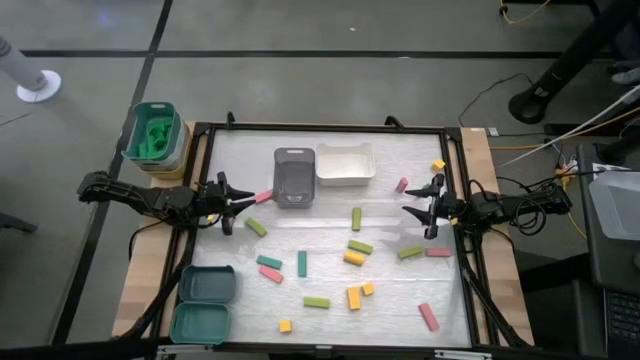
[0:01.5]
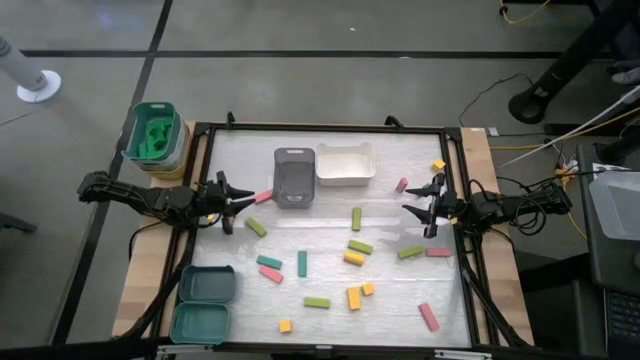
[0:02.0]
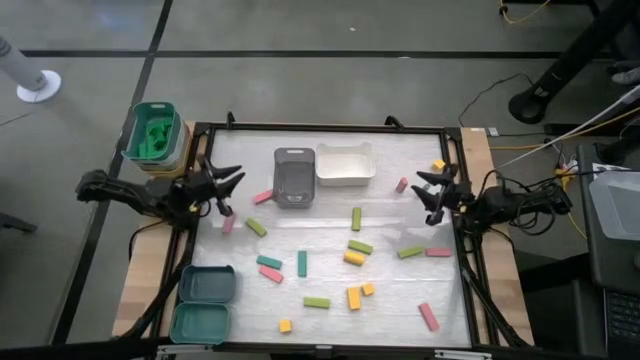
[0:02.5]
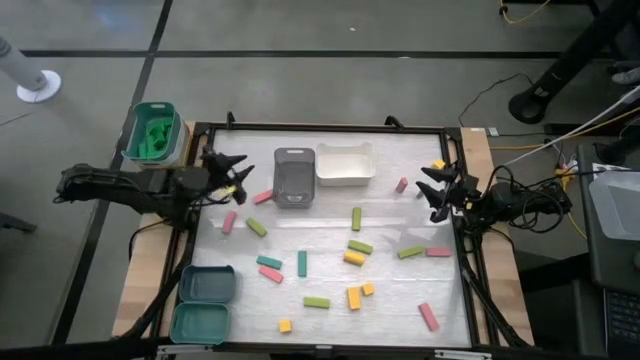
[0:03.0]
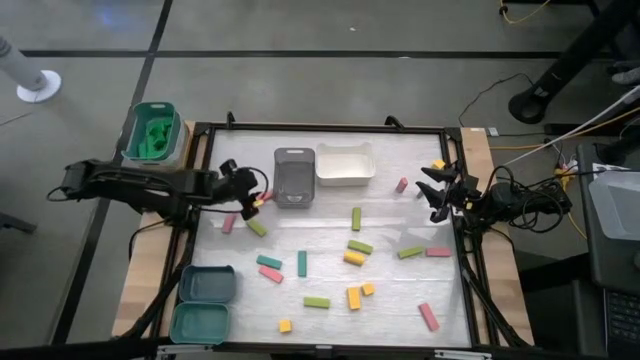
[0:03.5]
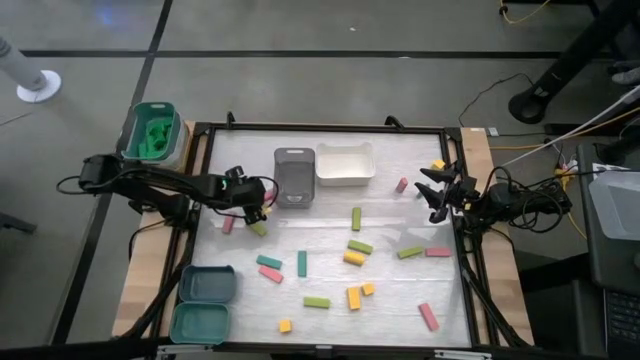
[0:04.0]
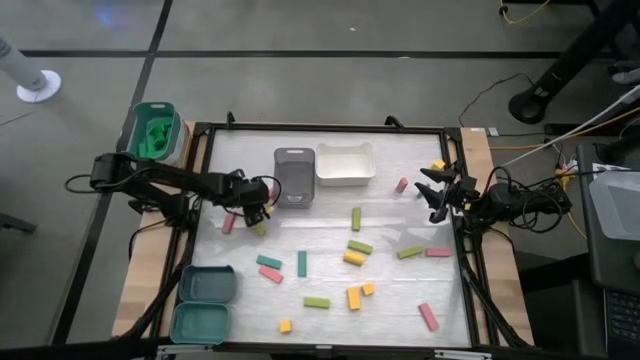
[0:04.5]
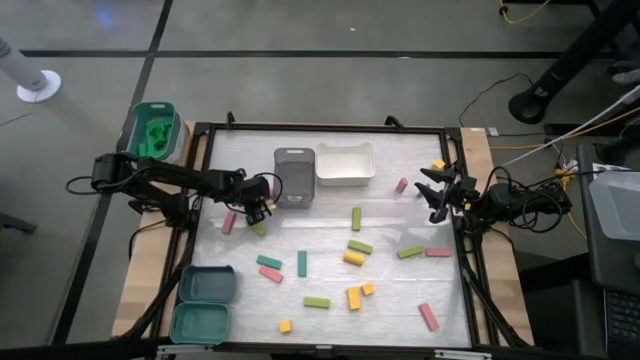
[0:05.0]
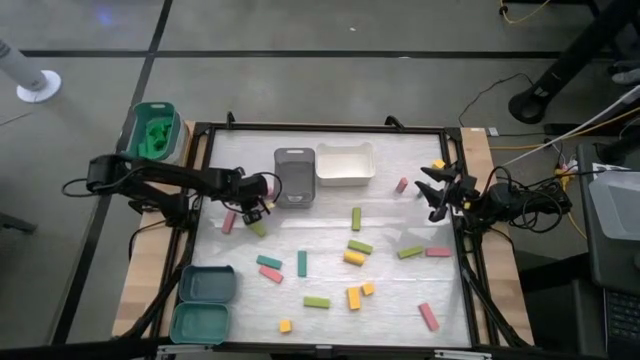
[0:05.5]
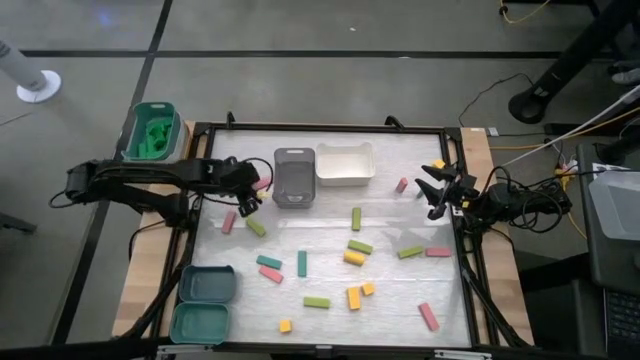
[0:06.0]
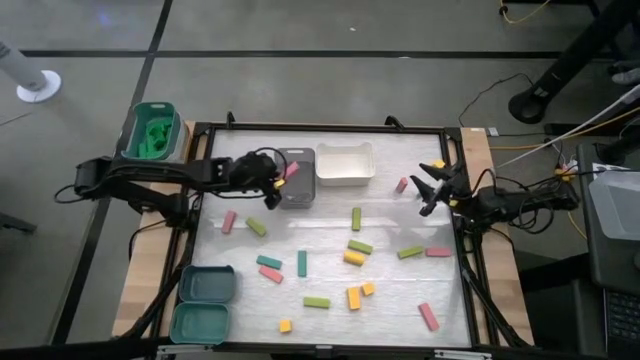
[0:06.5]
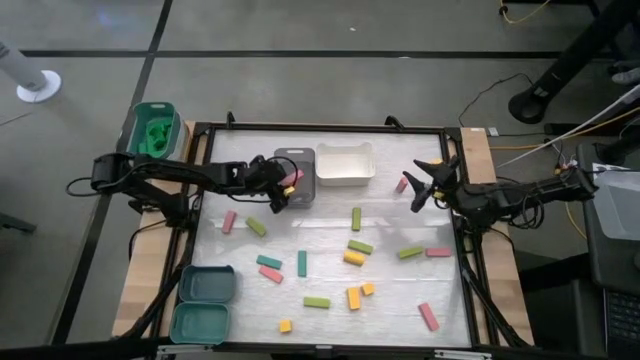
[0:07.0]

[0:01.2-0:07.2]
Task: Sort blocks
Put the pink block into the black bin

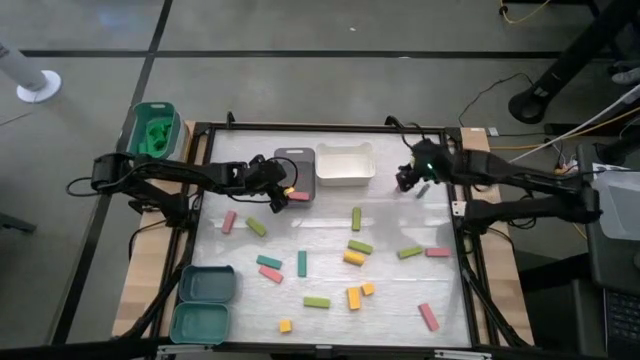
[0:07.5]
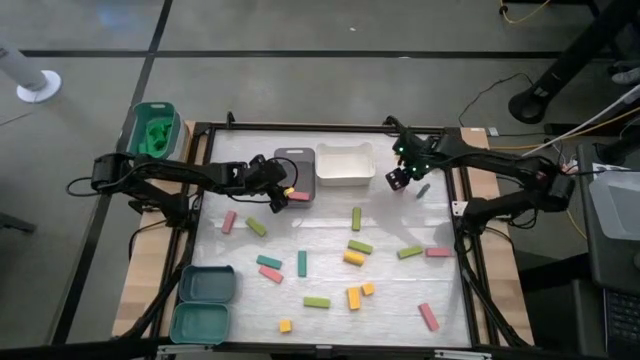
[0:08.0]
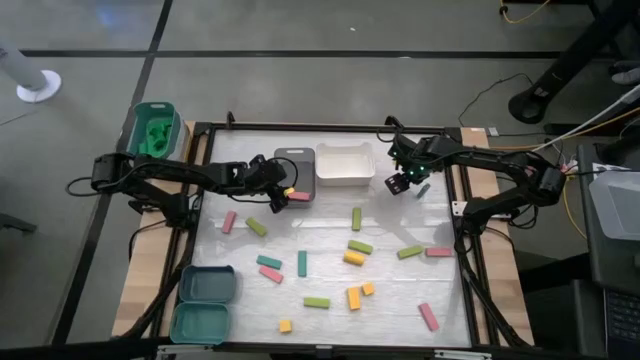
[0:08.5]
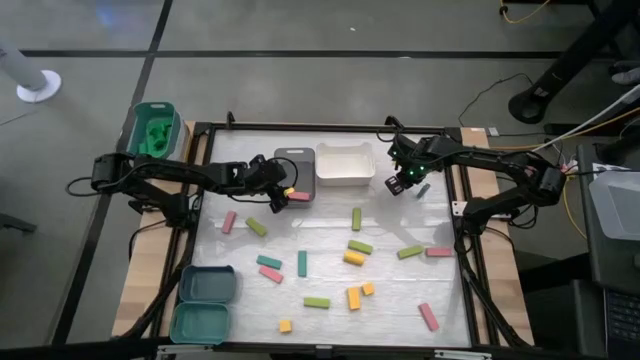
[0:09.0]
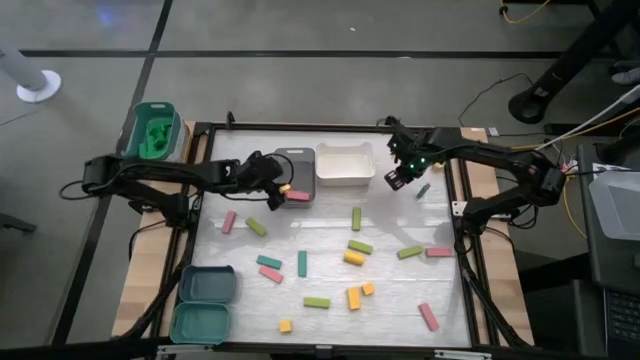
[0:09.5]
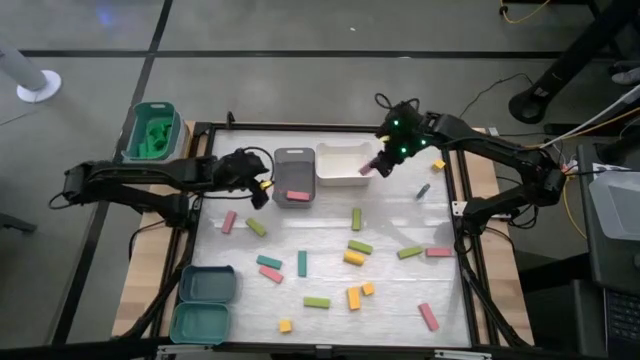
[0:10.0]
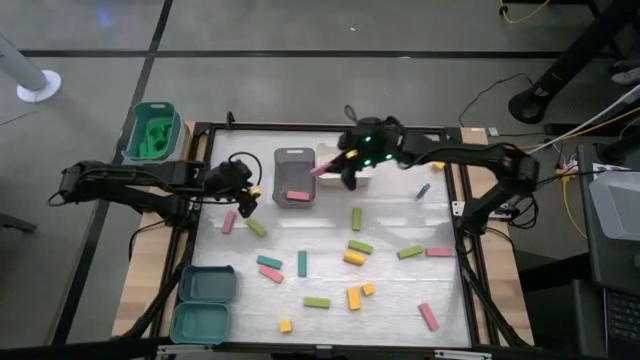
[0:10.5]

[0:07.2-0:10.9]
Put the pink block into the black bin

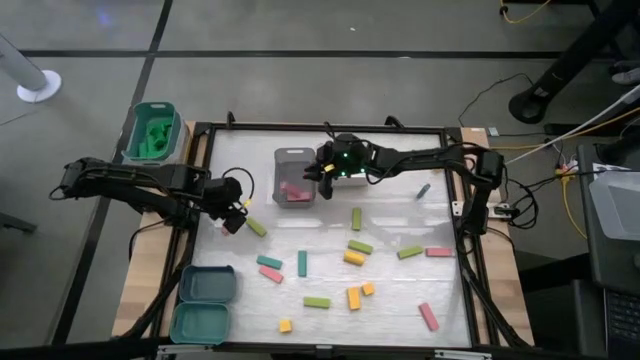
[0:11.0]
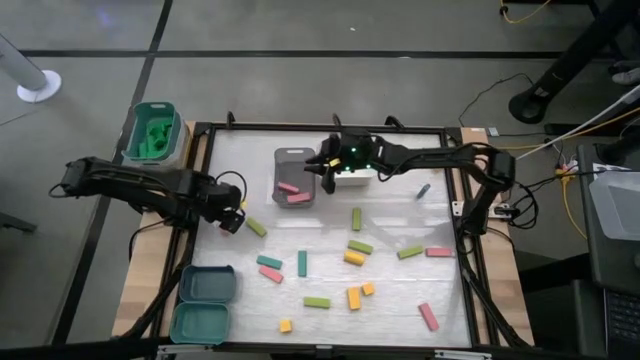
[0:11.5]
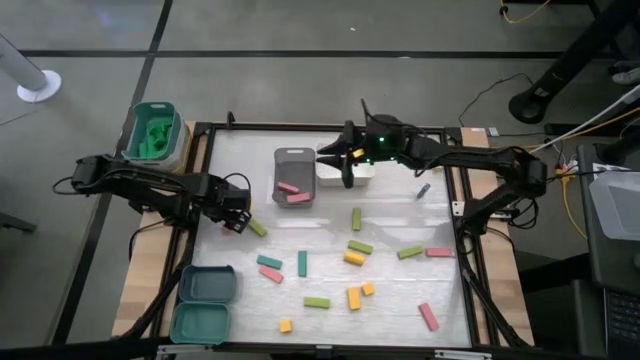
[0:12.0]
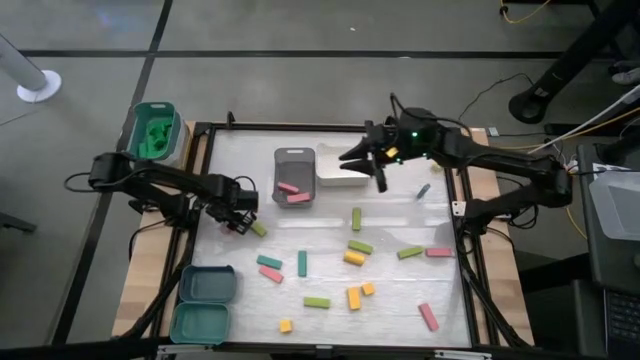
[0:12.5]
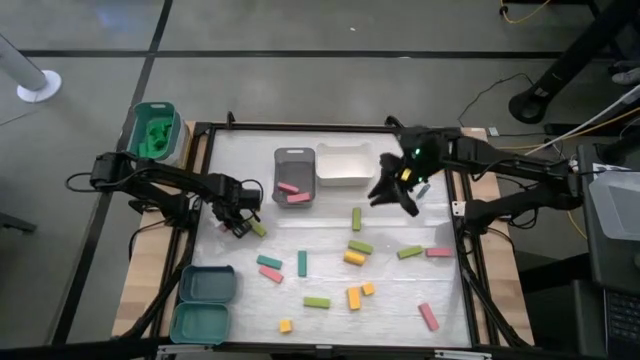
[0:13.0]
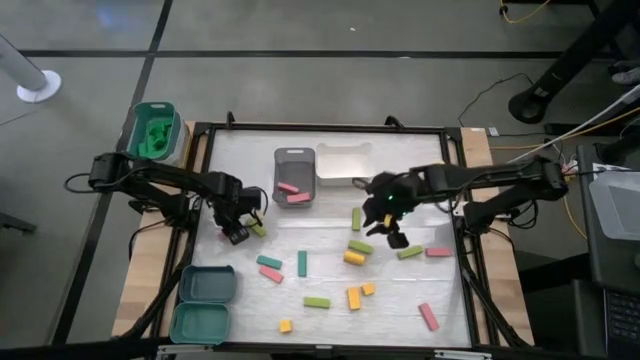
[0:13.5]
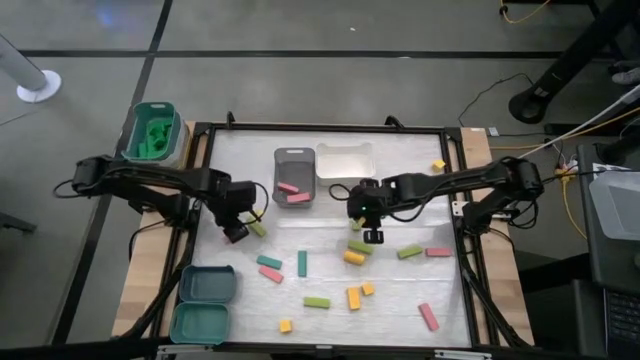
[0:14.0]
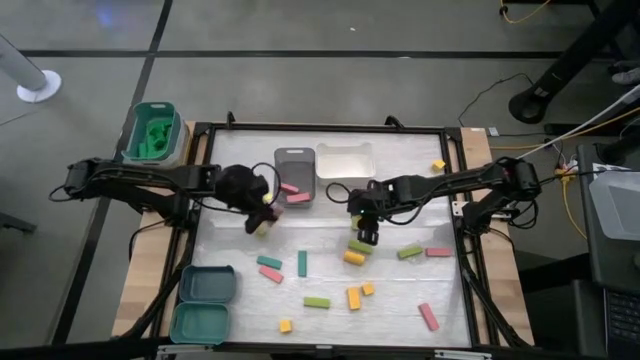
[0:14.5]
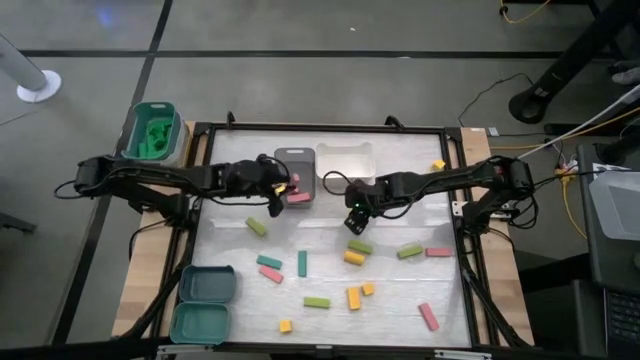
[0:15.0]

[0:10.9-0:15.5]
Put the pink block into the black bin

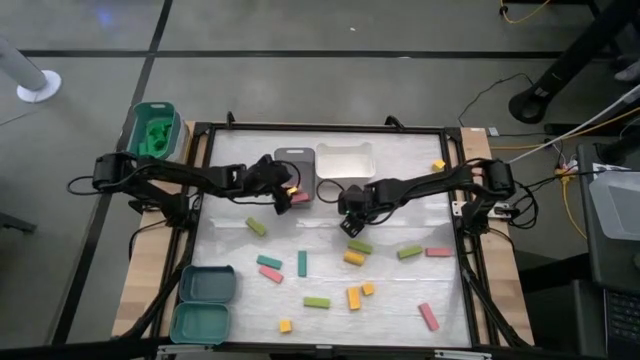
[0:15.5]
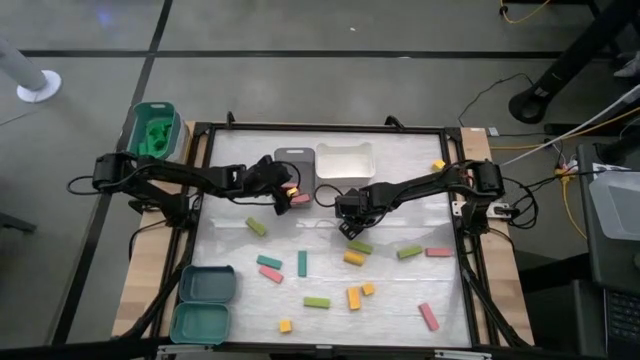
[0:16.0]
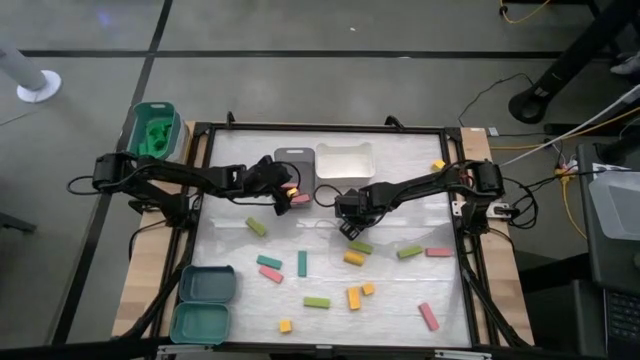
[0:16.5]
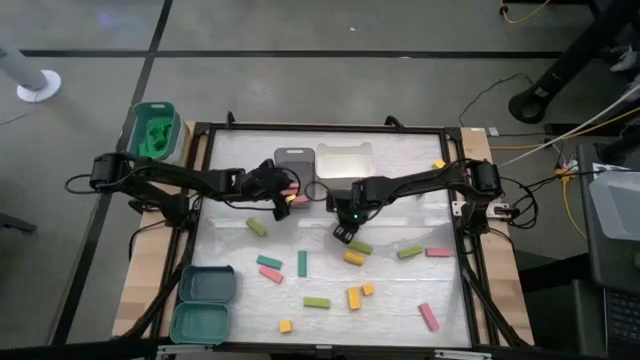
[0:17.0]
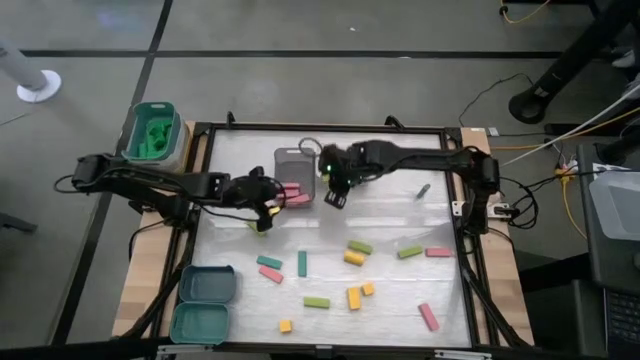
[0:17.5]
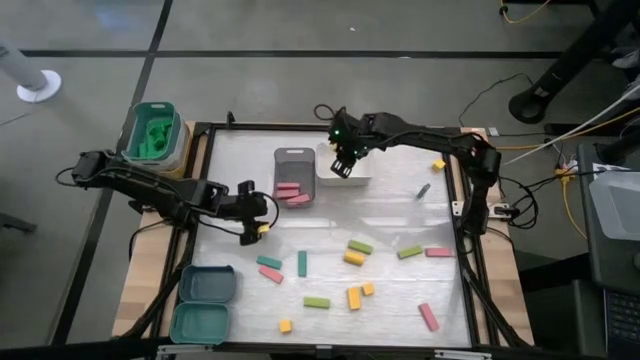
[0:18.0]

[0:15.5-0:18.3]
Put the green block into the white bin

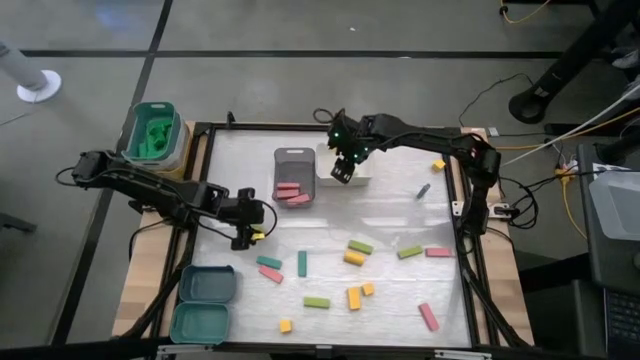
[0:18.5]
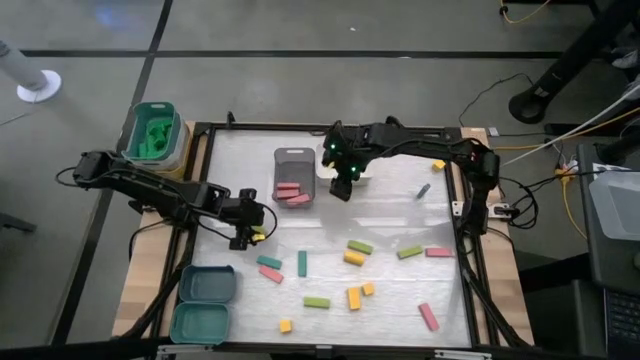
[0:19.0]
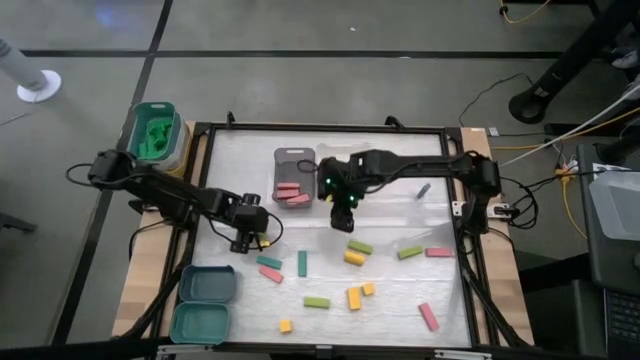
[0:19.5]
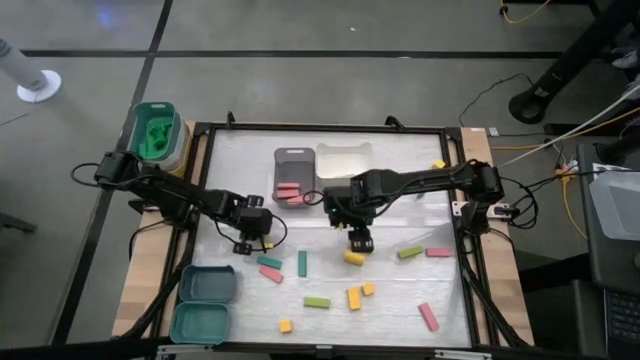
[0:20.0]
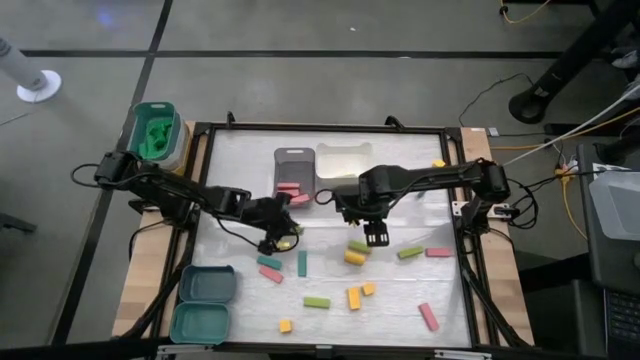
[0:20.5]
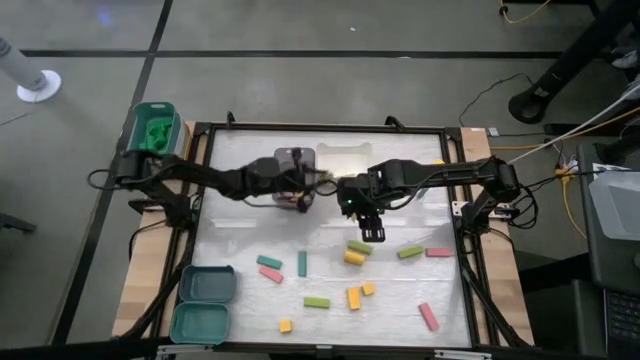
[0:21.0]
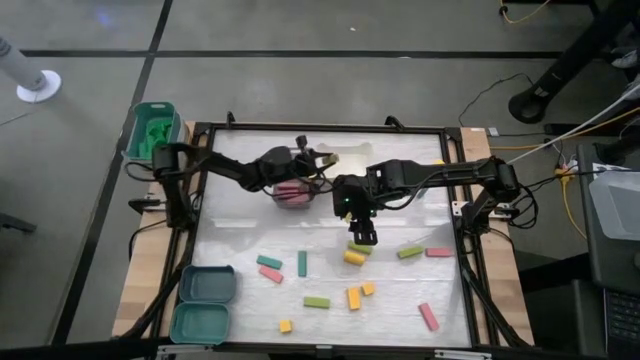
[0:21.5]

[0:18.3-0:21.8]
Put the green block into the white bin

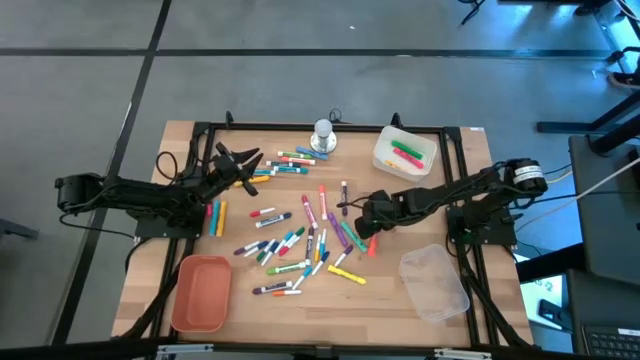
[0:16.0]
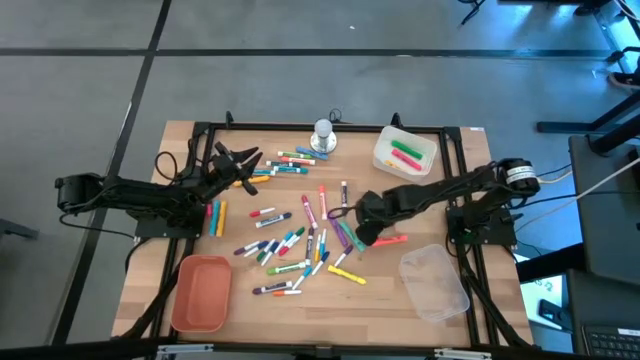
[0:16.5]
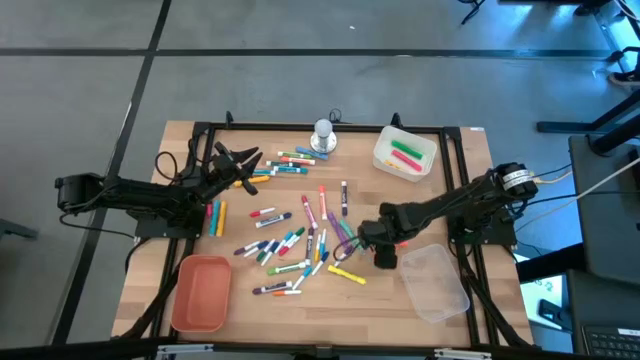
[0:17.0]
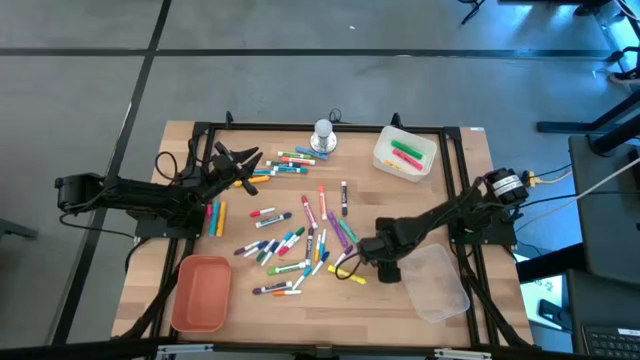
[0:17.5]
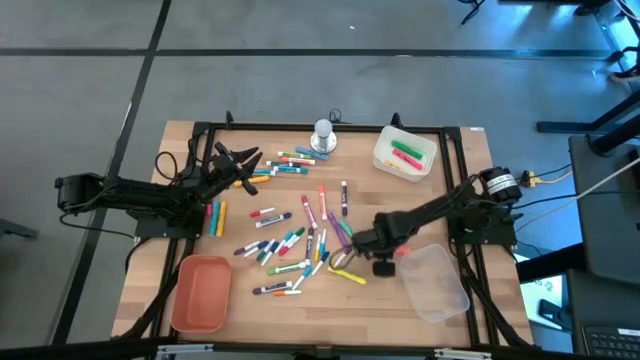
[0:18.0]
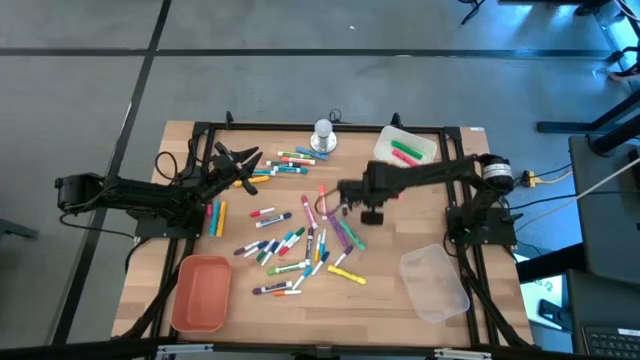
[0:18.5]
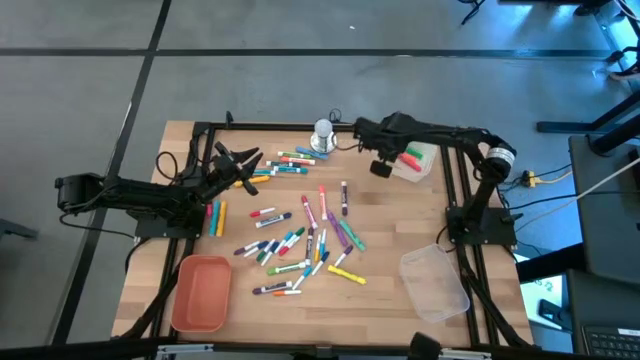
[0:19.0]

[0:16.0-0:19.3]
Task: Pick & Place Markers
Put the large orange highlighter pen into the white bin
